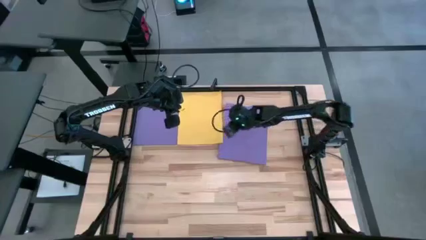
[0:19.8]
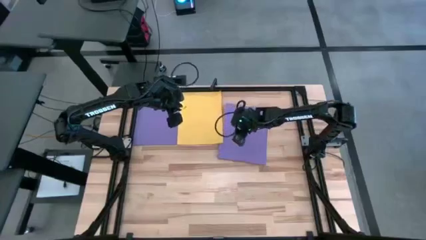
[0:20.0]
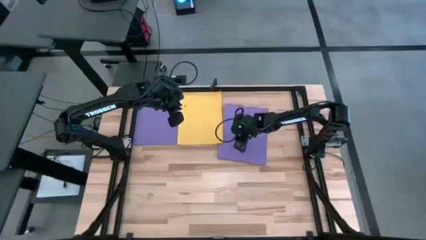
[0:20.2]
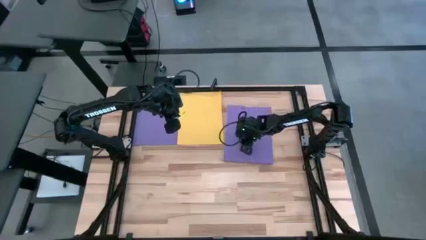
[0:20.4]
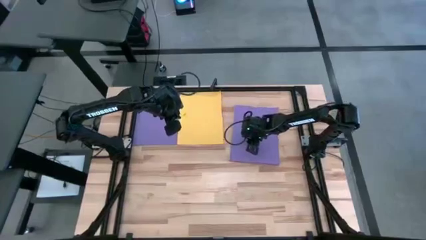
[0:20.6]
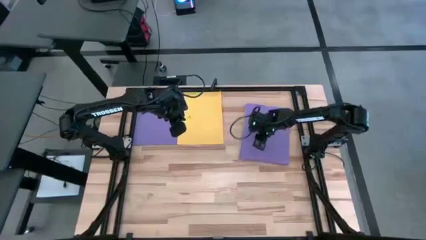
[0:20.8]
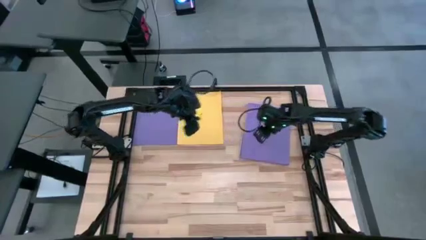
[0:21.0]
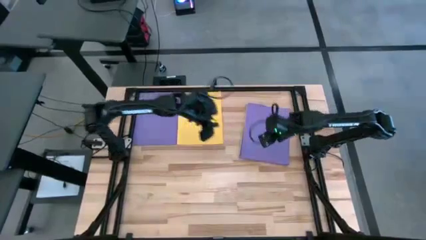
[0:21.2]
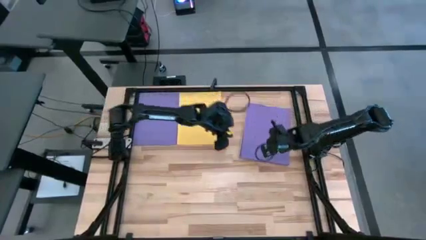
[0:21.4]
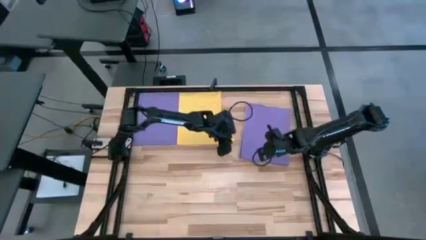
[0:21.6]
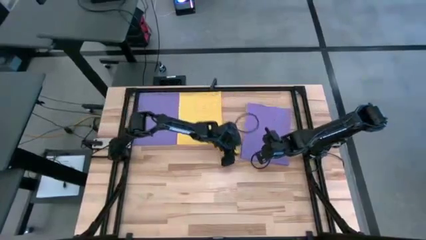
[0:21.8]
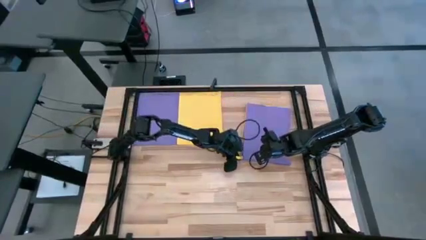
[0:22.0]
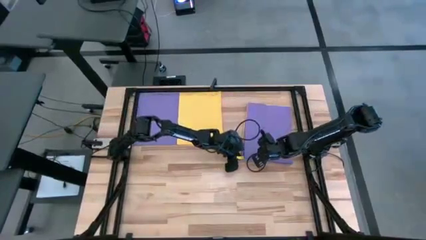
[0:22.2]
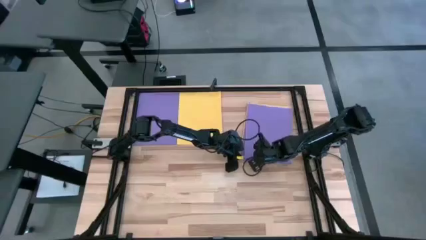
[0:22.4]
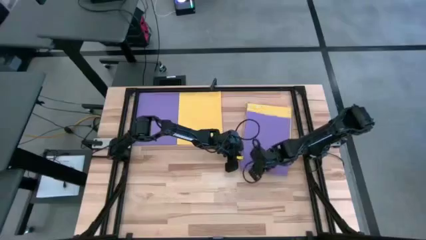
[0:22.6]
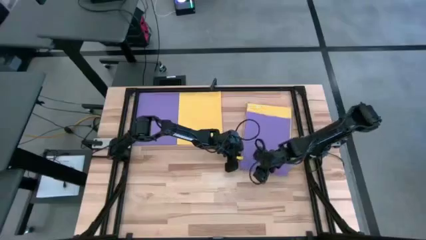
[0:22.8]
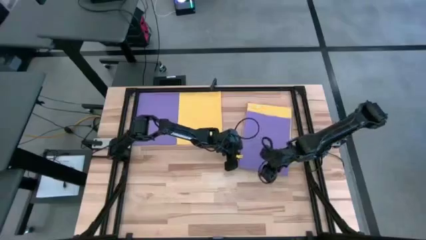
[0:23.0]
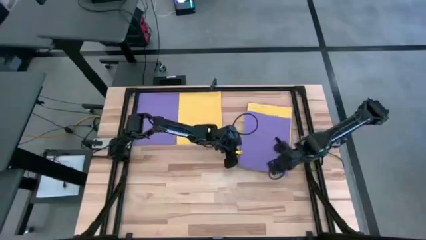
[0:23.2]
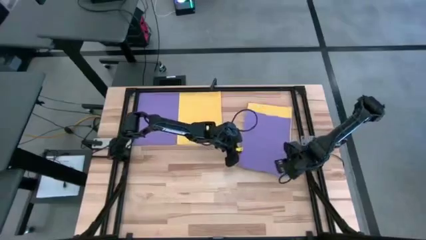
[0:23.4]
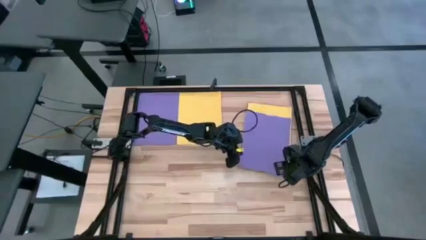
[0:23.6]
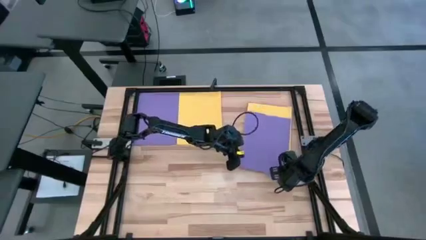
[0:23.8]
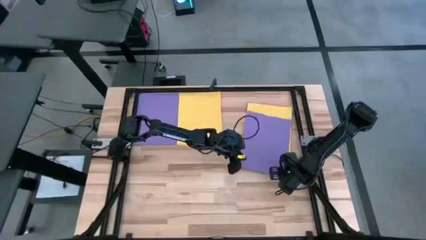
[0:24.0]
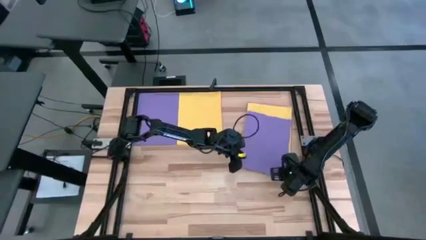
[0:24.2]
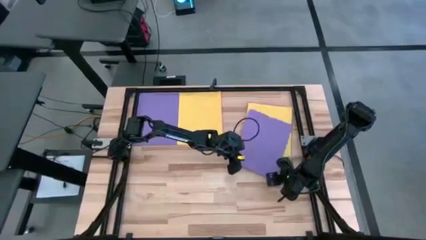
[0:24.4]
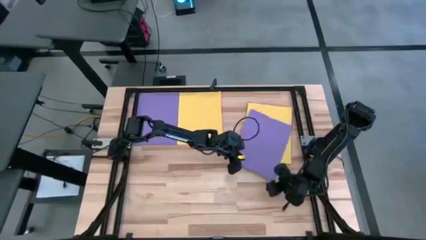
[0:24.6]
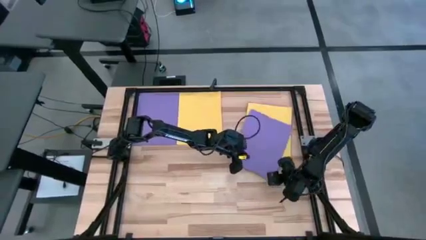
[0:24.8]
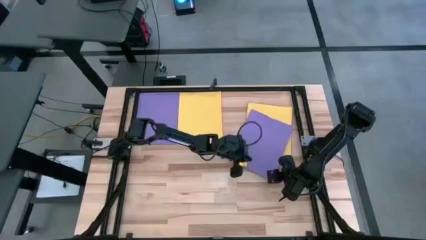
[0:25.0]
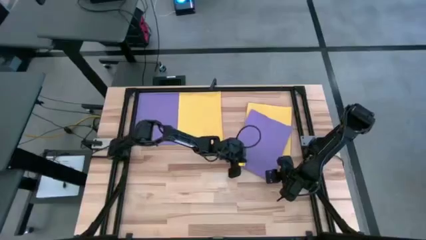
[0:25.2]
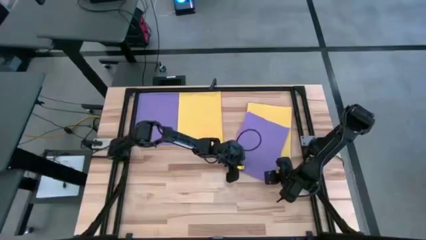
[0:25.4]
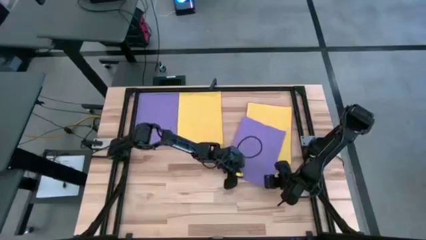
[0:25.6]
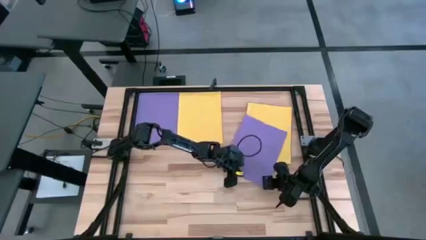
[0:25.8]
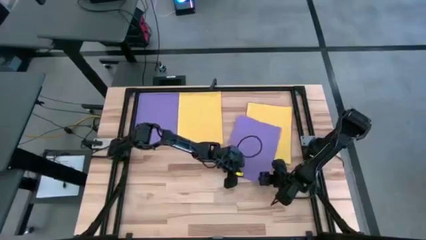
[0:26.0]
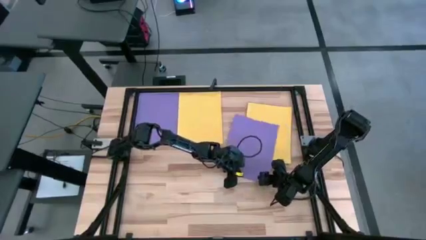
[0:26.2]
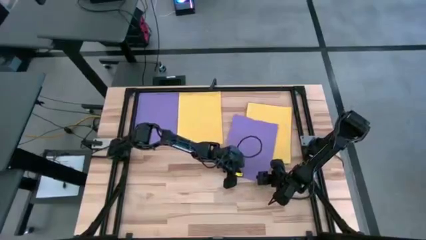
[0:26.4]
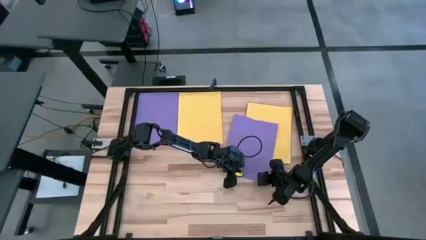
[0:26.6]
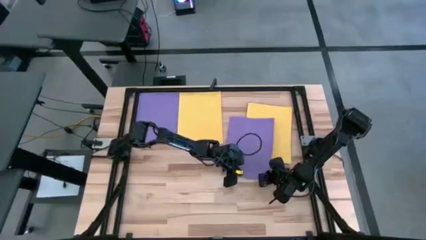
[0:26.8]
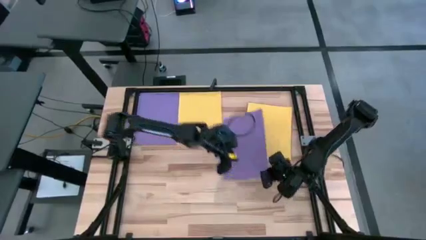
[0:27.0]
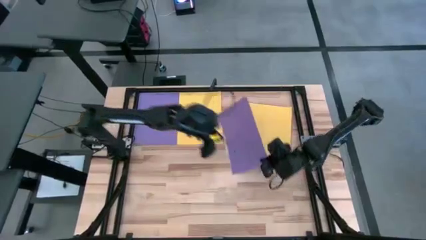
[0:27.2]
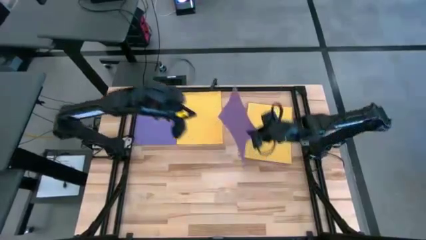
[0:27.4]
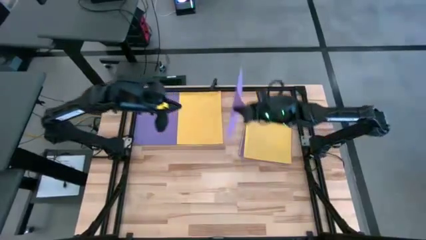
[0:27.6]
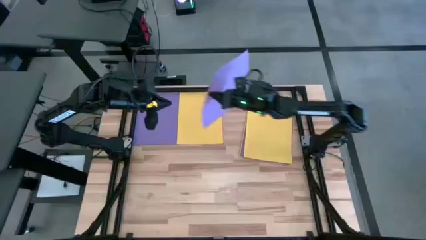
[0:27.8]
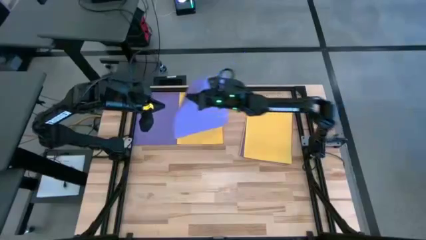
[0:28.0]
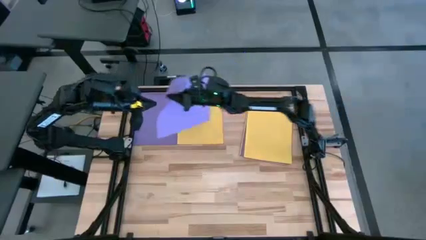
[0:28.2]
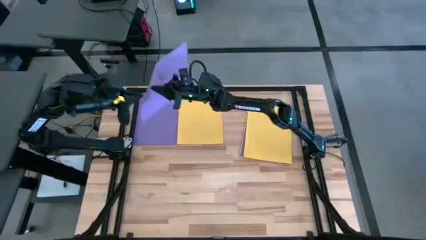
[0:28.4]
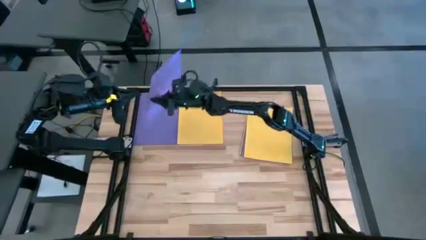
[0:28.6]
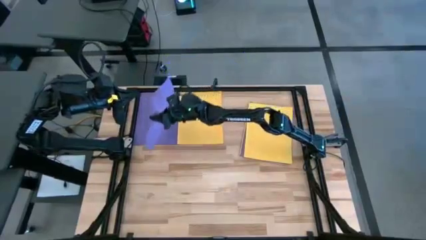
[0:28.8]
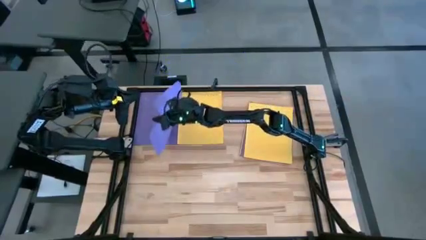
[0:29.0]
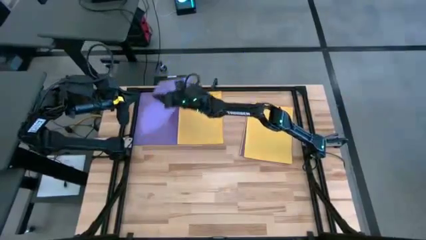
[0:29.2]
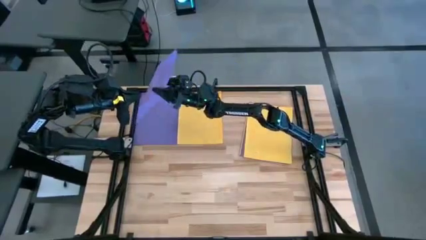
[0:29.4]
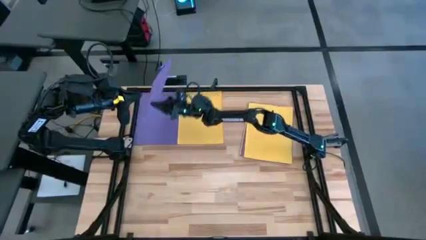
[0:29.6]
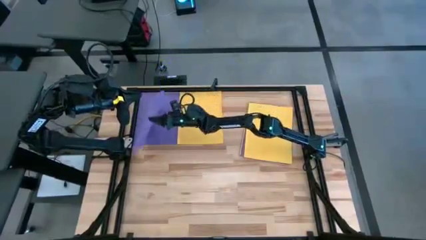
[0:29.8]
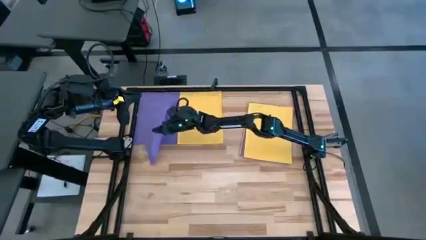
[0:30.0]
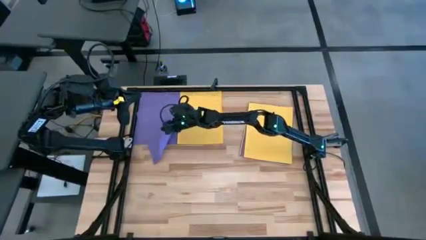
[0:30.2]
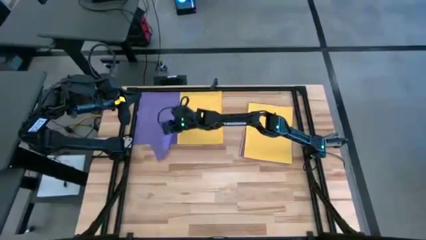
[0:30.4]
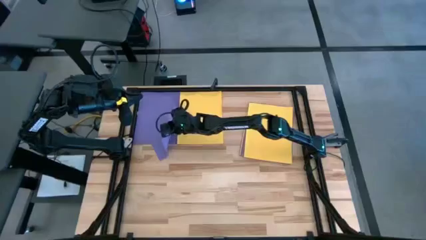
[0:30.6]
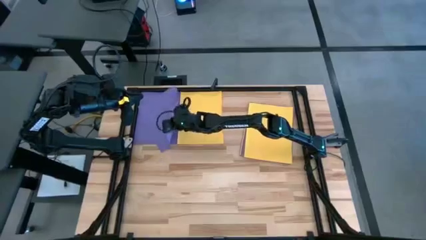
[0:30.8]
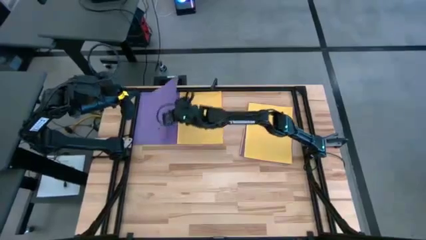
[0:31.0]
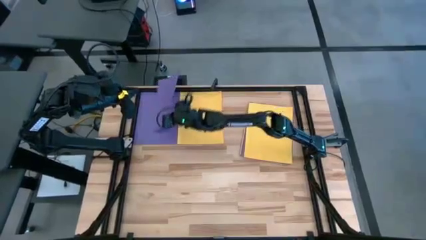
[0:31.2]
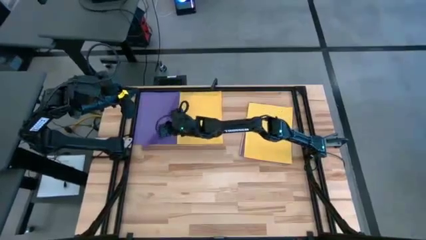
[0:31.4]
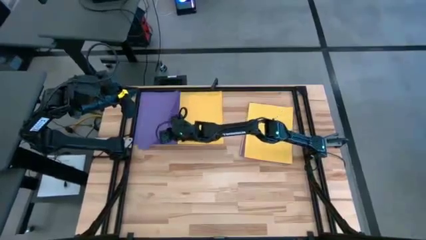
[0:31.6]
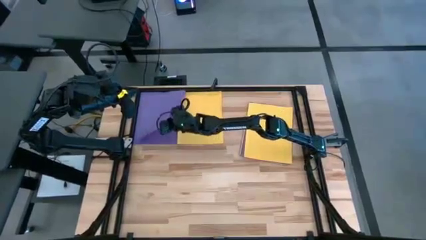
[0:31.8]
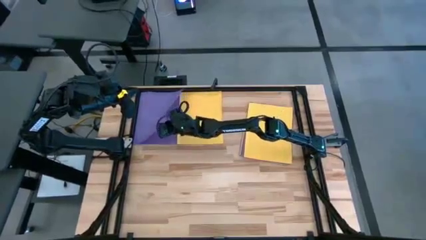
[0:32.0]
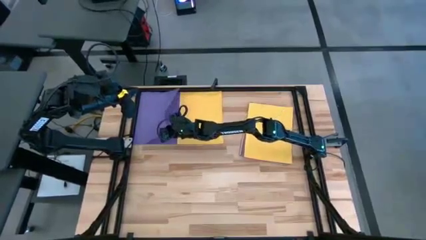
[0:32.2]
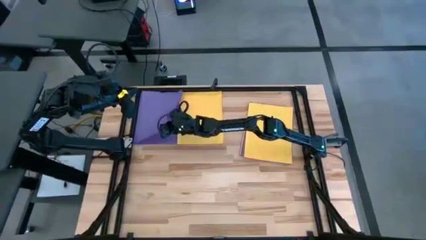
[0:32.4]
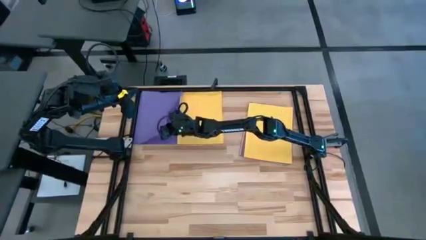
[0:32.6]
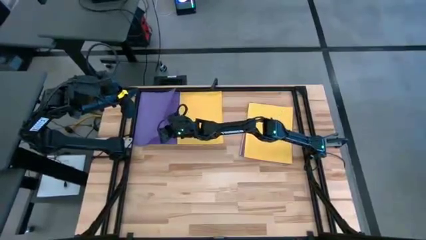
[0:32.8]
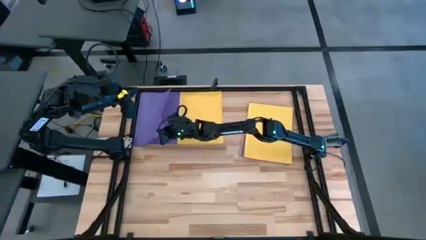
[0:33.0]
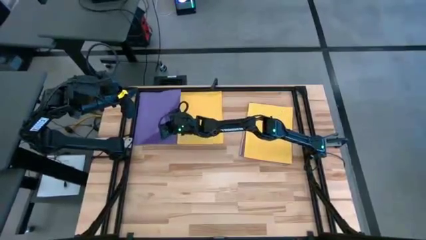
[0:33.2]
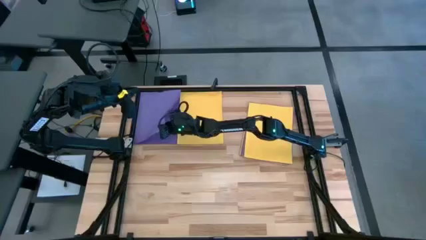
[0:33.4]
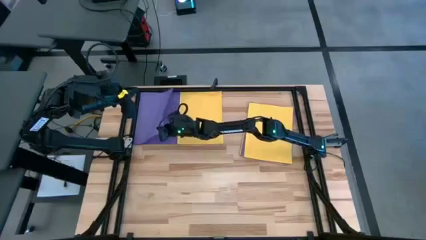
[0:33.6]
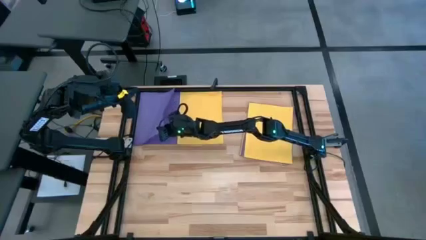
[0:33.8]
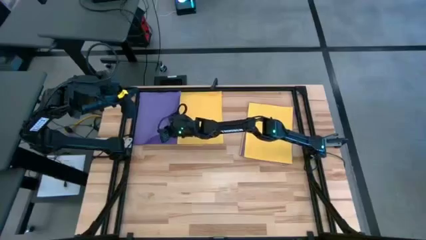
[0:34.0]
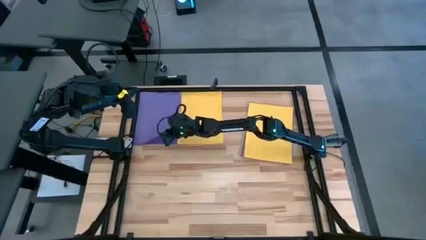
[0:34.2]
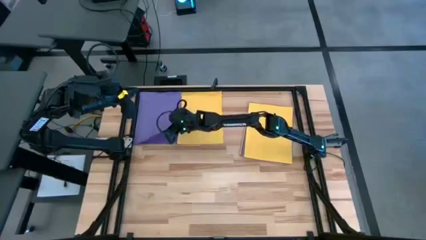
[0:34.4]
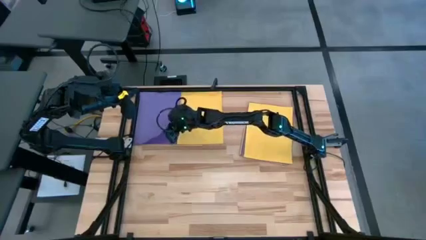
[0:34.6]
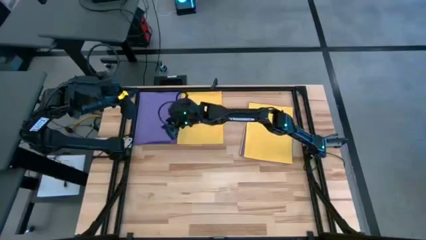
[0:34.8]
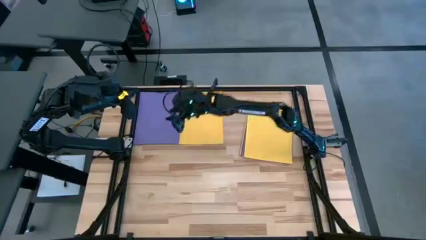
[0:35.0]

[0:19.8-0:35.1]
Task: Organize paper
Stack the purple paper on top of the purple paper
